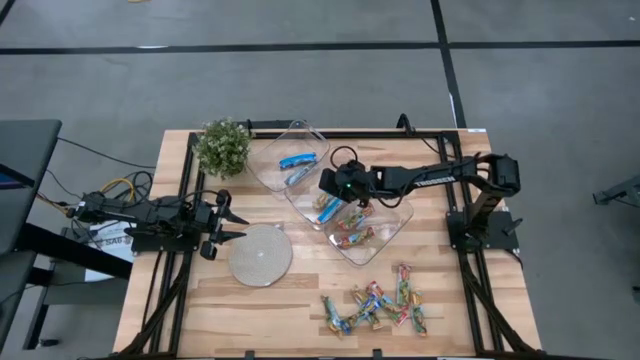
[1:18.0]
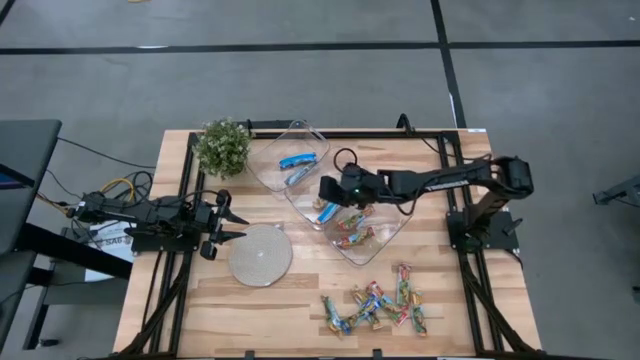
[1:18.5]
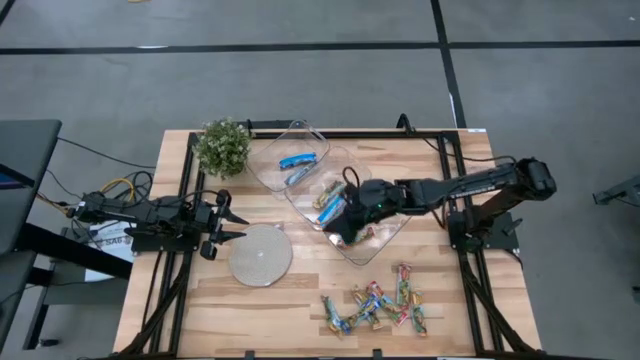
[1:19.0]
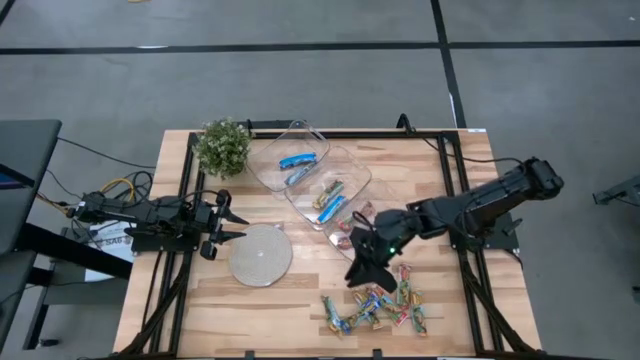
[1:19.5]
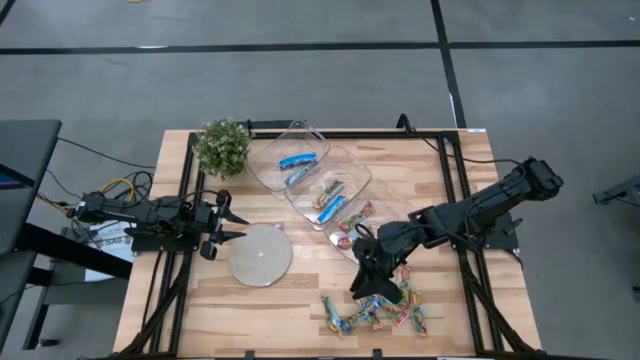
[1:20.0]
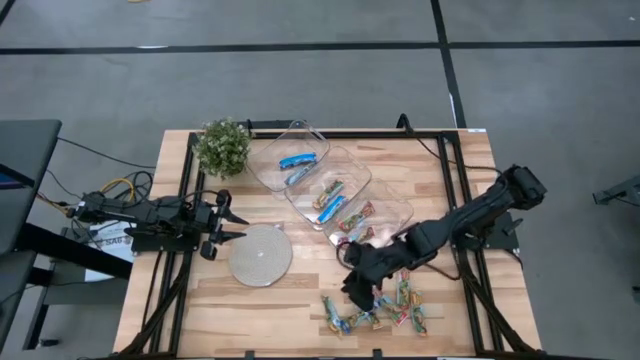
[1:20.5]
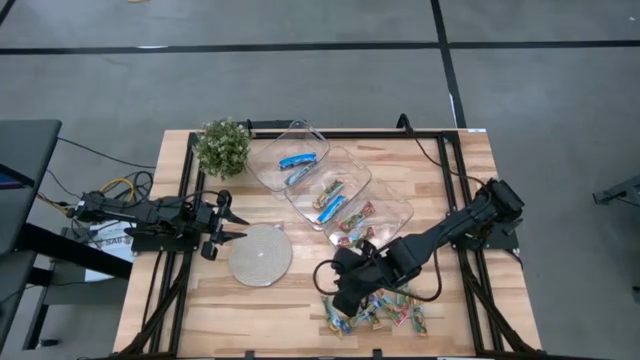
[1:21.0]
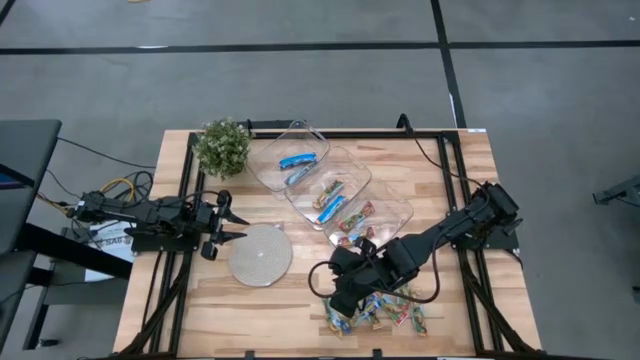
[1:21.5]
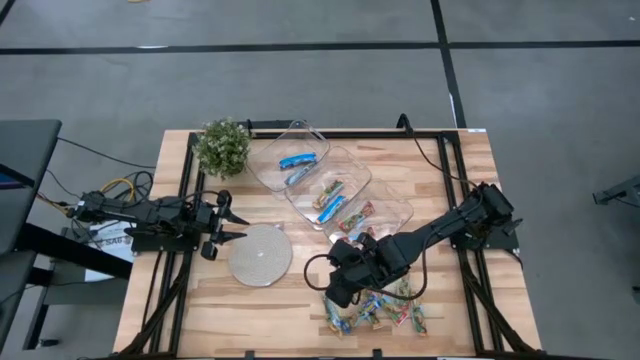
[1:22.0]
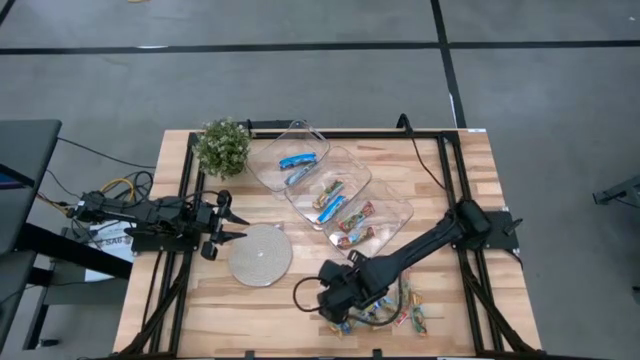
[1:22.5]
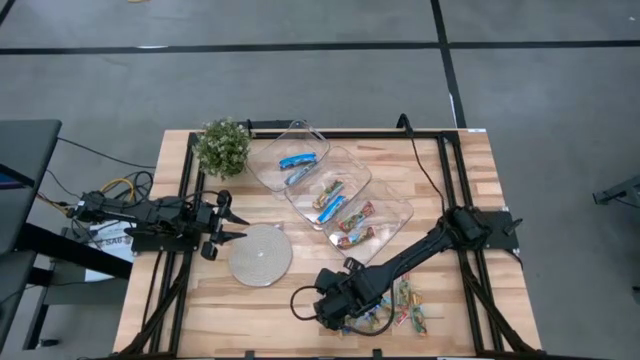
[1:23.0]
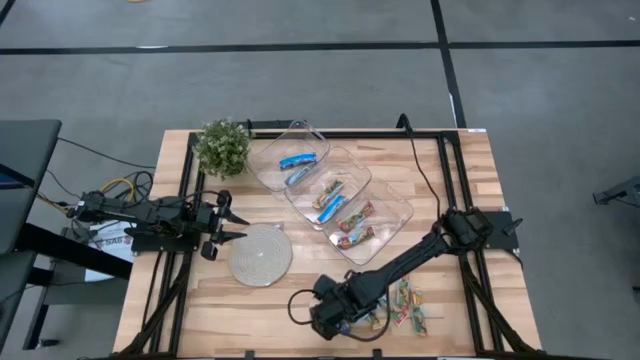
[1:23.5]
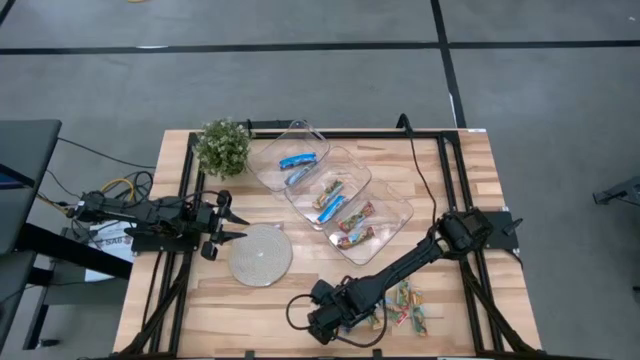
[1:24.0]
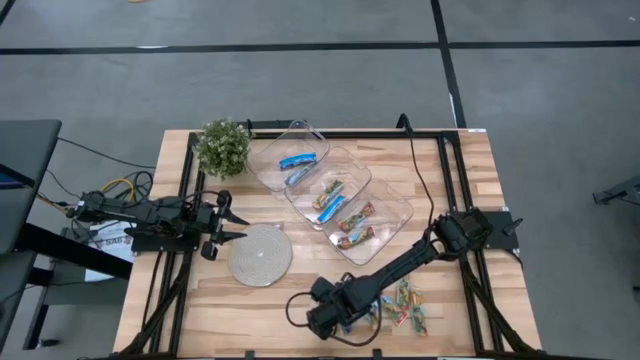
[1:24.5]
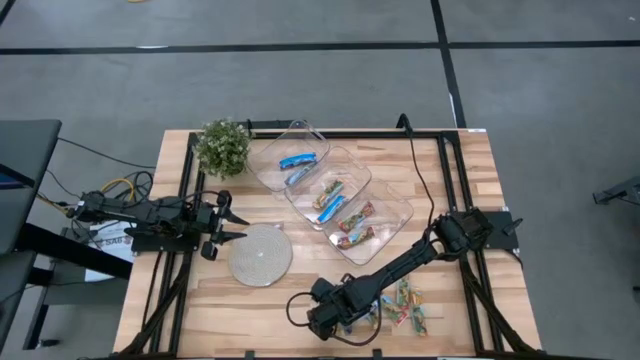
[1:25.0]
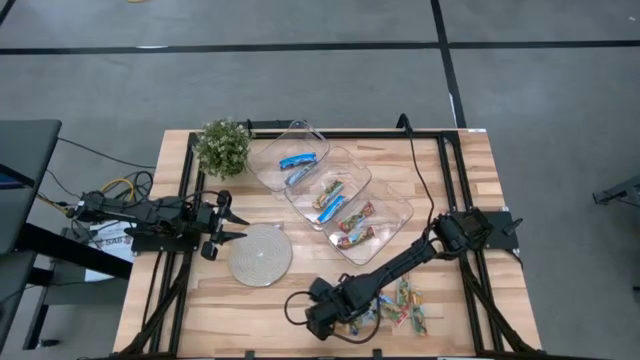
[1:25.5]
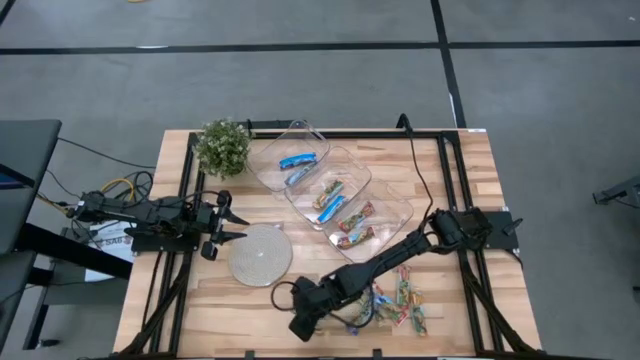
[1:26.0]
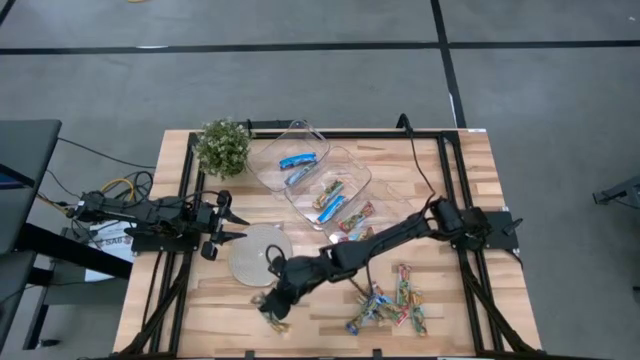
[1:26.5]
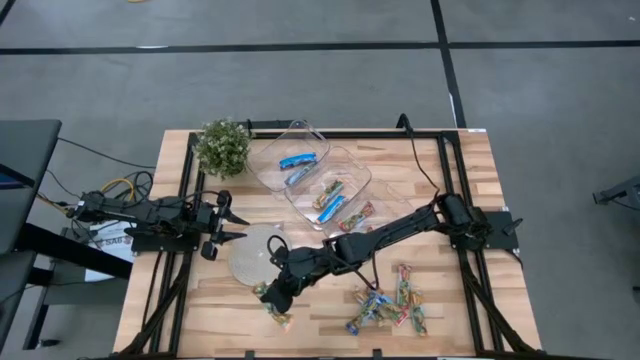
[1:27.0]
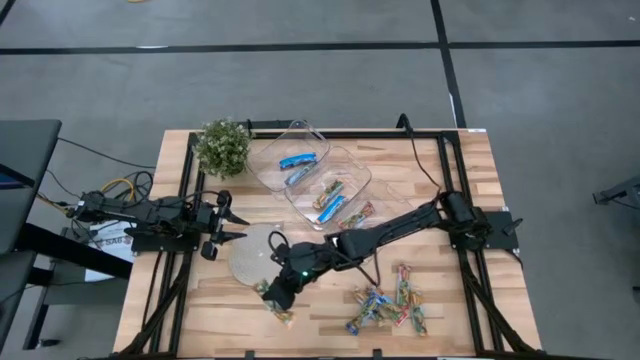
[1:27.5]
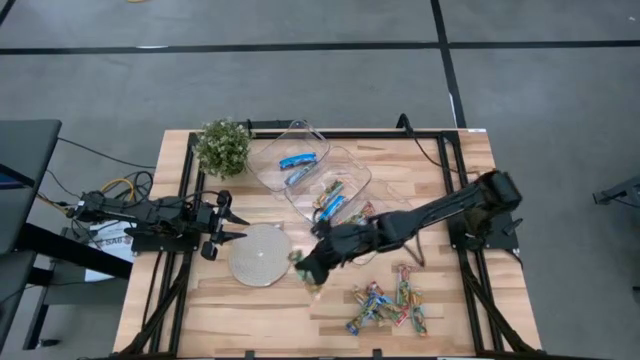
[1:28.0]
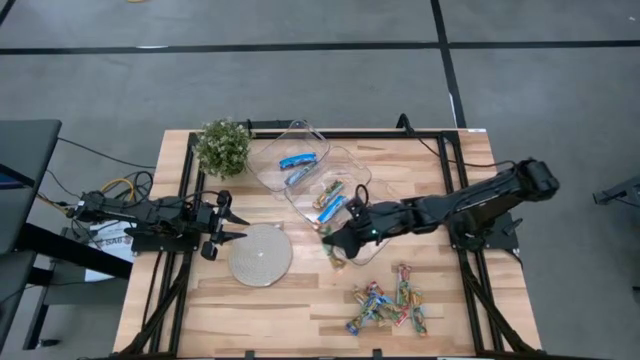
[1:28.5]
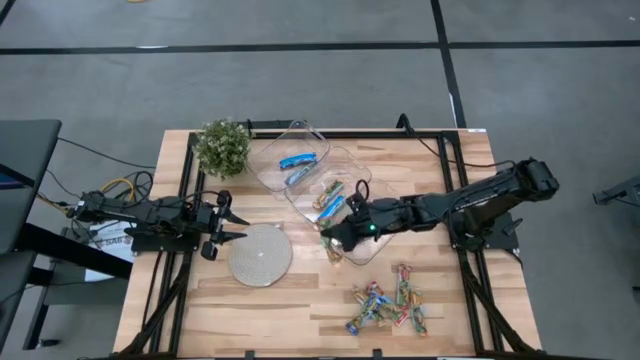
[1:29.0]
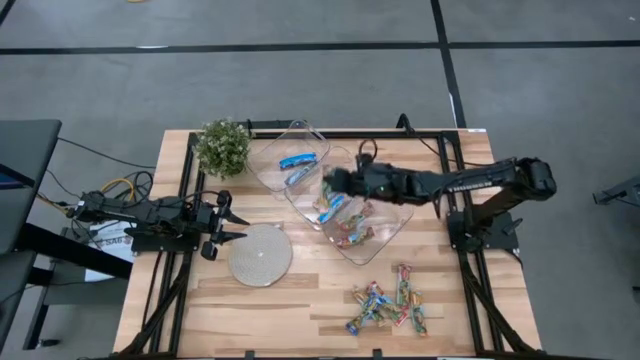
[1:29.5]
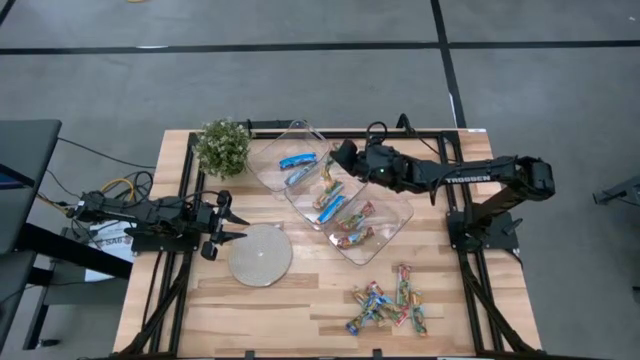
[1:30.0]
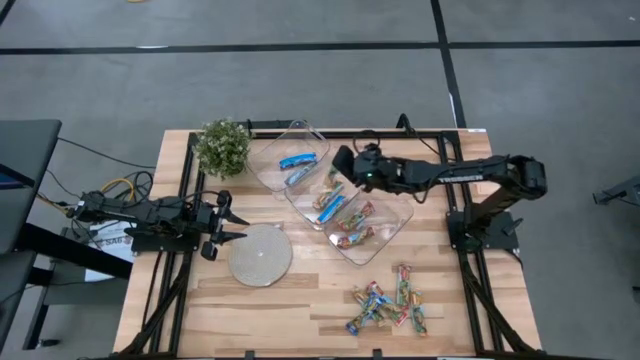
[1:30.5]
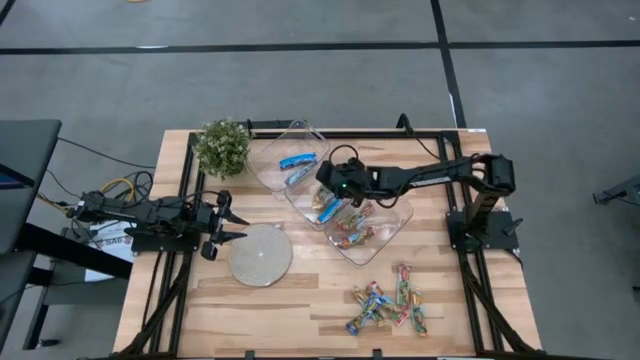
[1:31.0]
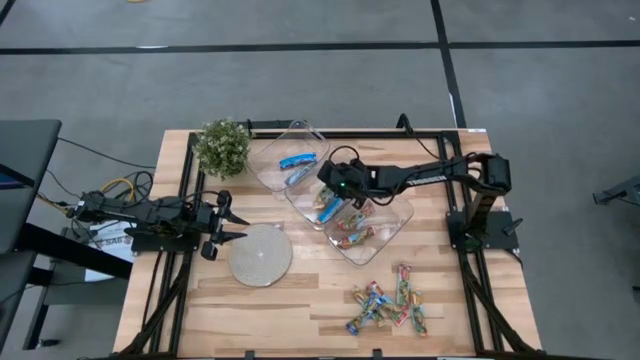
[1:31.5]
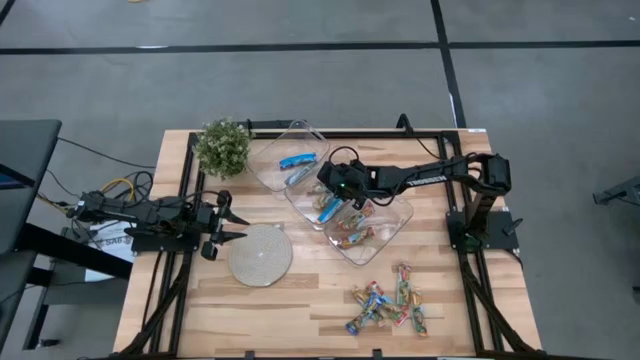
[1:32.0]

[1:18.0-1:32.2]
Task: Pick and place Granola Bars by type
Put the yellow granola bar into the middle transparent bin

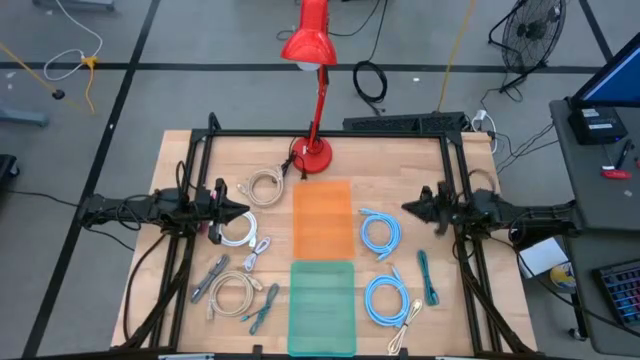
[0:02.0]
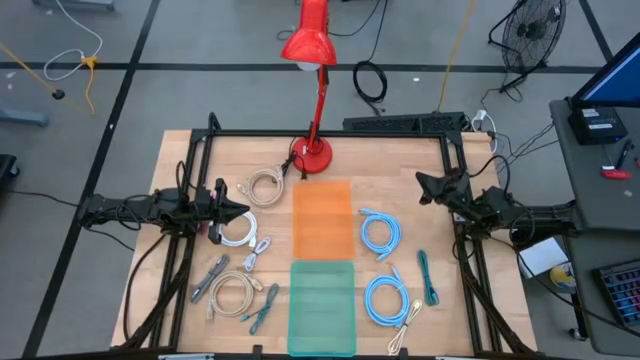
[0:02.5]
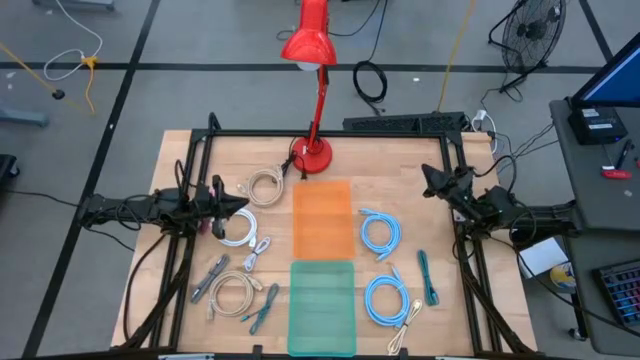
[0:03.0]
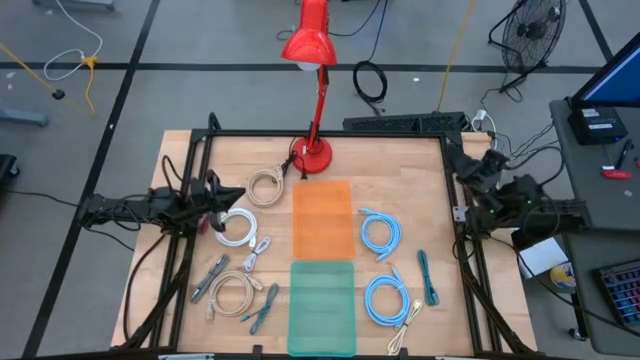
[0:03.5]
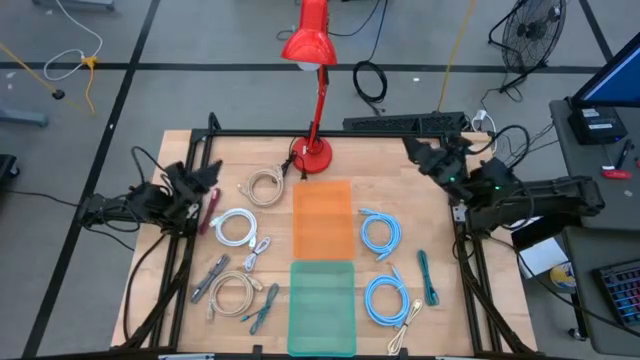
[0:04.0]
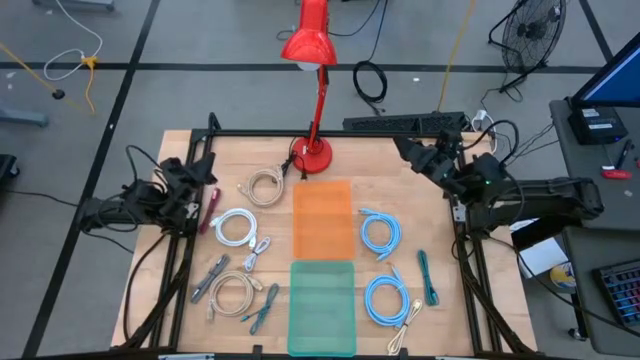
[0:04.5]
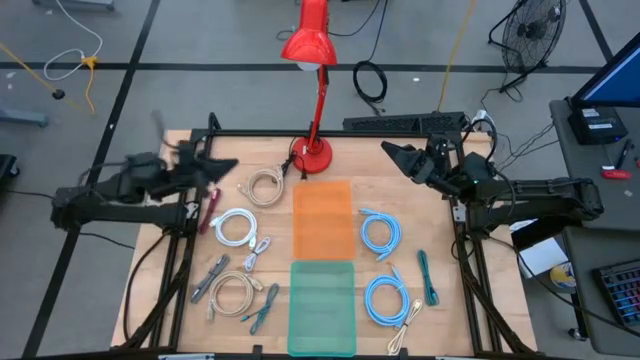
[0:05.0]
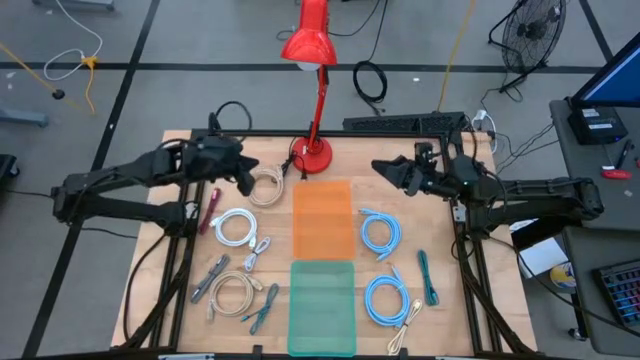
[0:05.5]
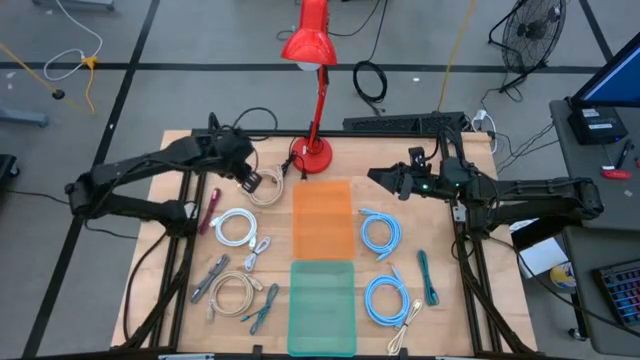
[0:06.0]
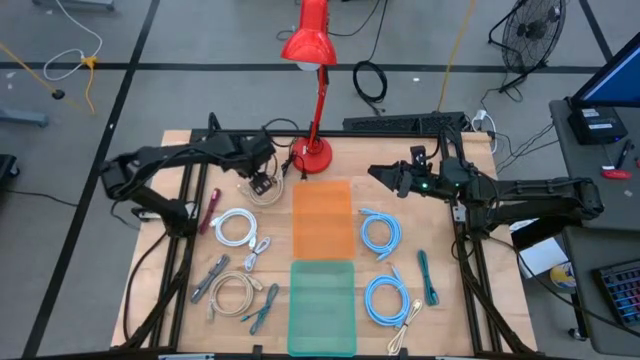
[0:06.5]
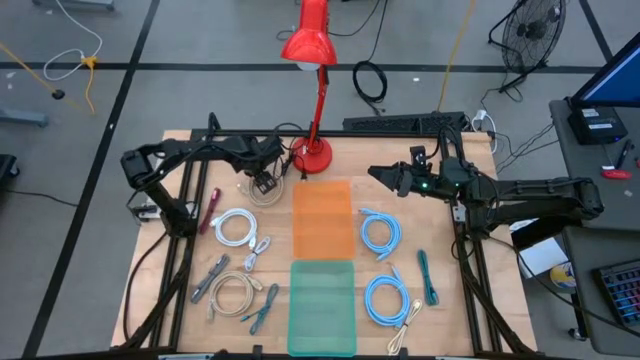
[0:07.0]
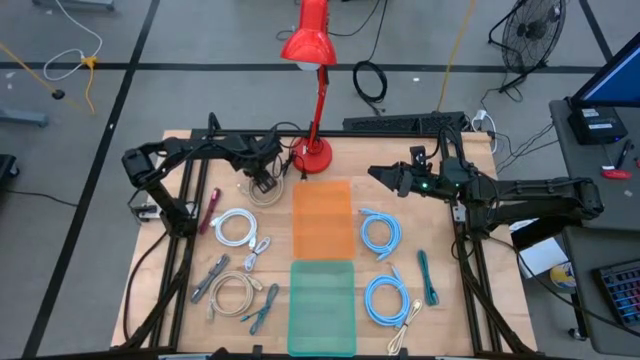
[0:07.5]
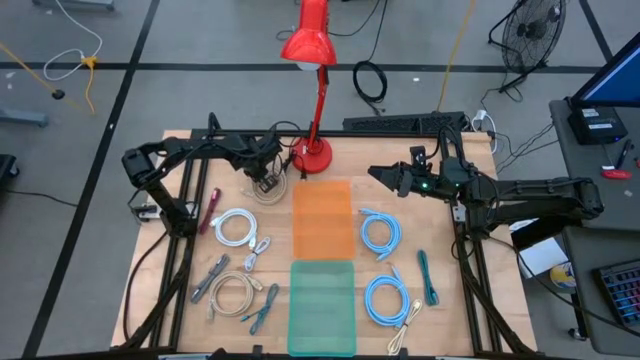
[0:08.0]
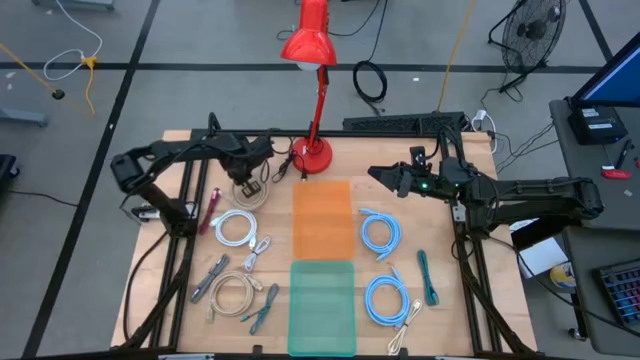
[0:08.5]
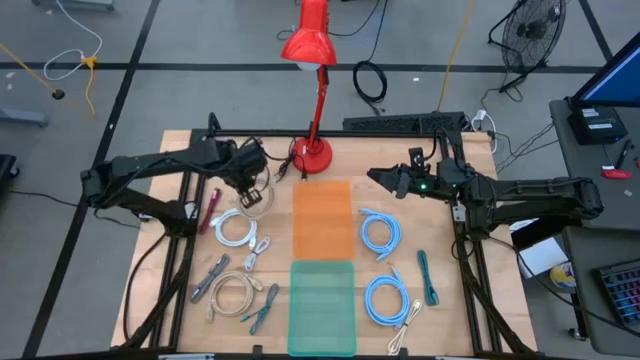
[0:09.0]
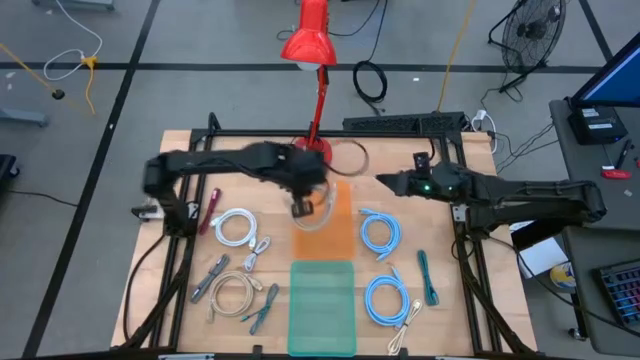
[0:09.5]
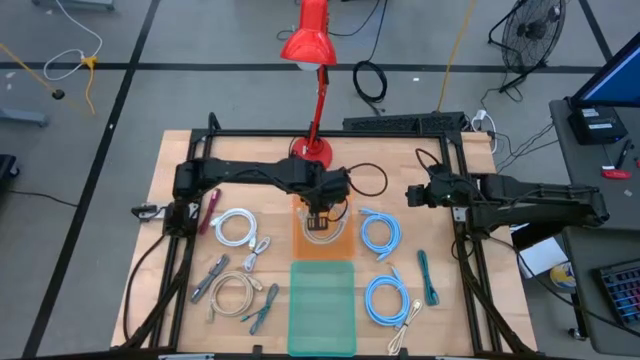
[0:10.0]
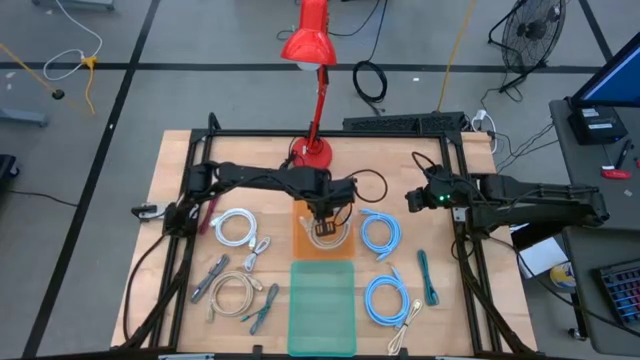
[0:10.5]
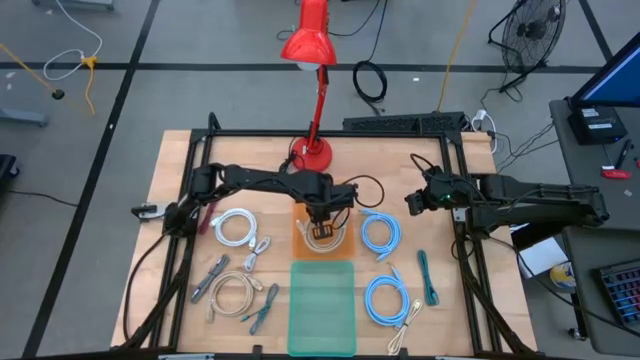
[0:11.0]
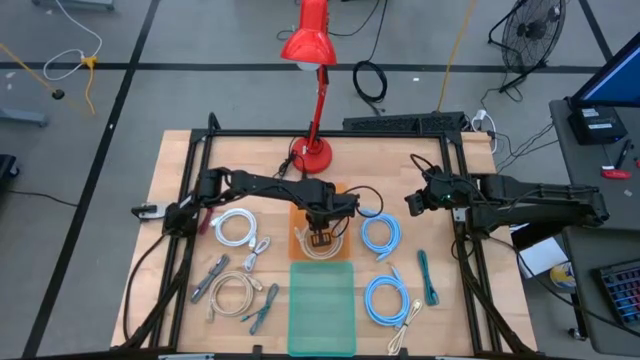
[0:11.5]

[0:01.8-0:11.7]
Task: Sort cables
Put the top brown video cable into the orange bin
